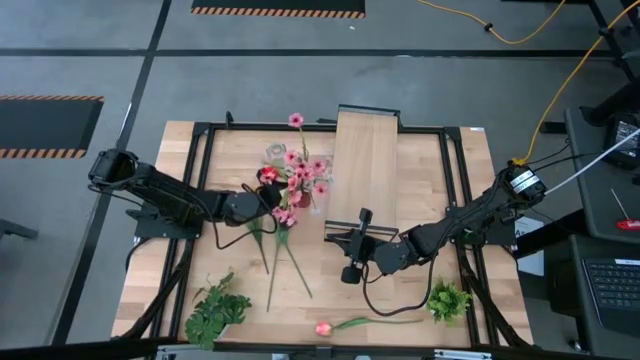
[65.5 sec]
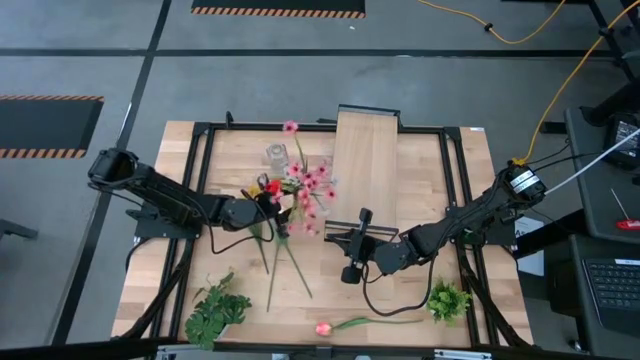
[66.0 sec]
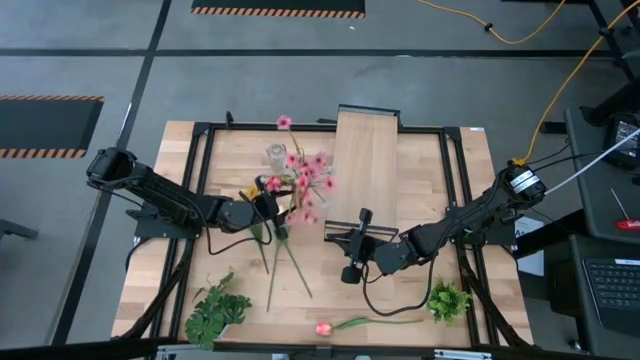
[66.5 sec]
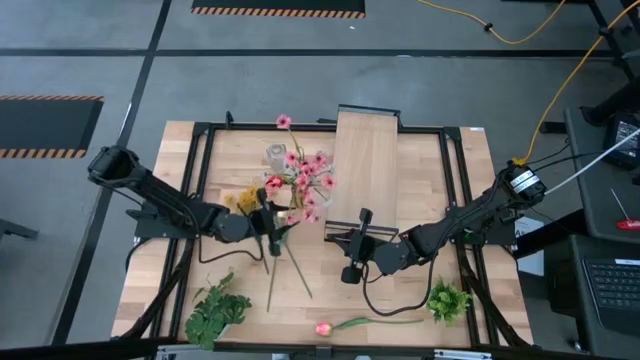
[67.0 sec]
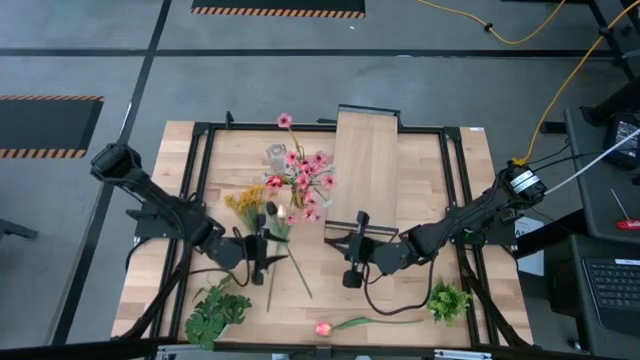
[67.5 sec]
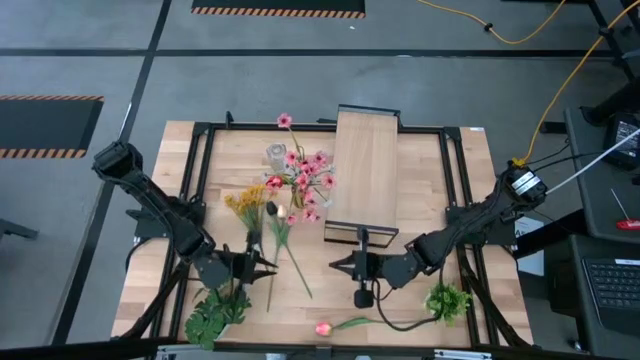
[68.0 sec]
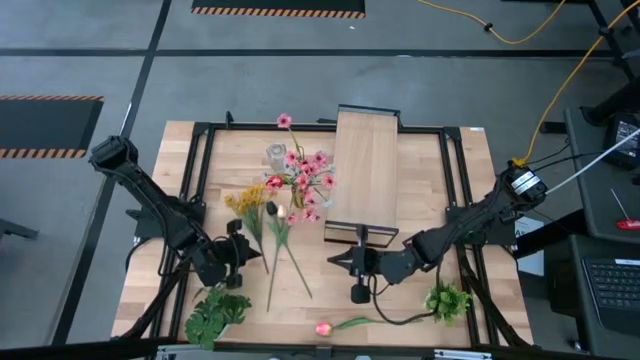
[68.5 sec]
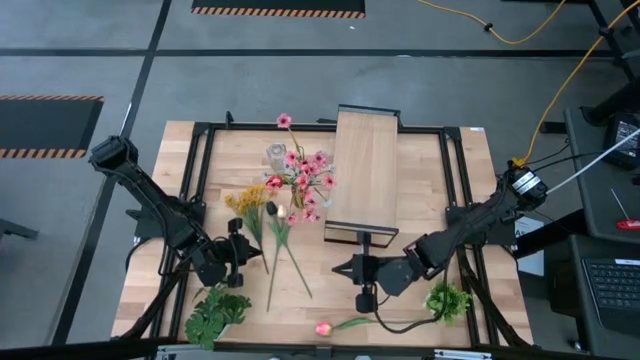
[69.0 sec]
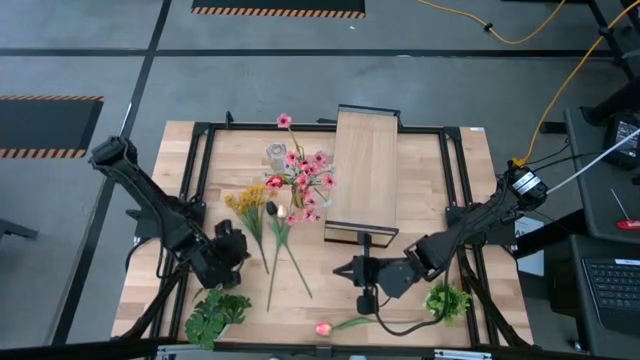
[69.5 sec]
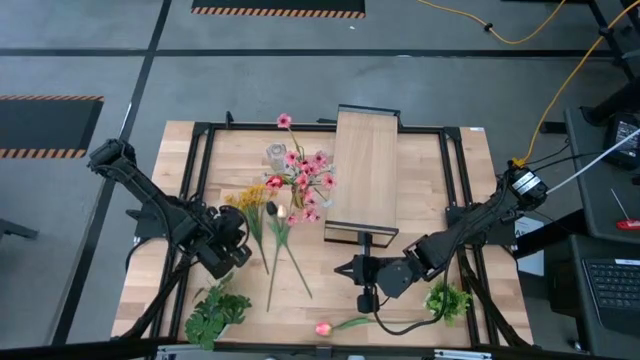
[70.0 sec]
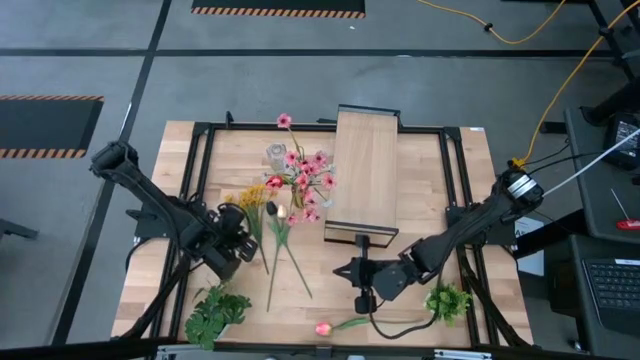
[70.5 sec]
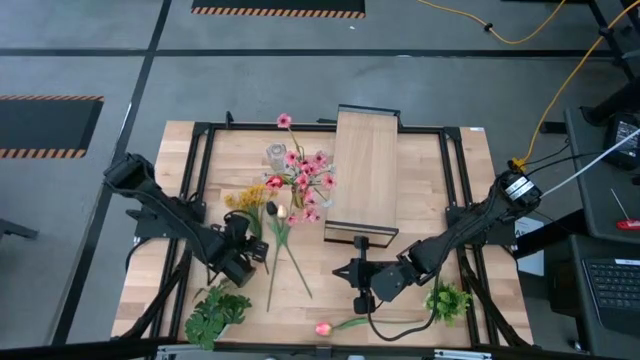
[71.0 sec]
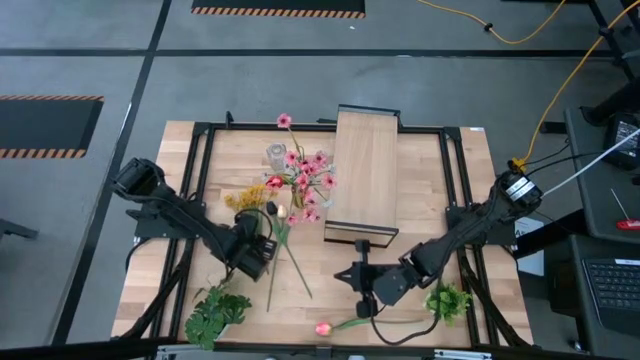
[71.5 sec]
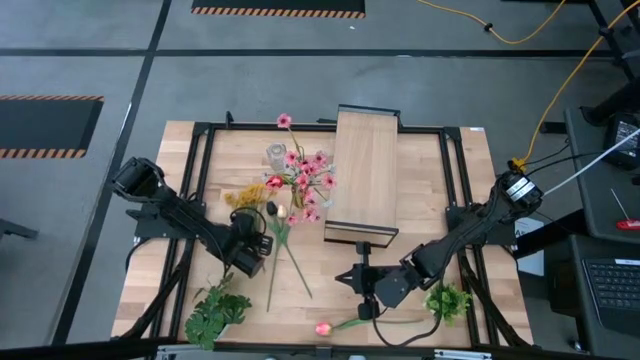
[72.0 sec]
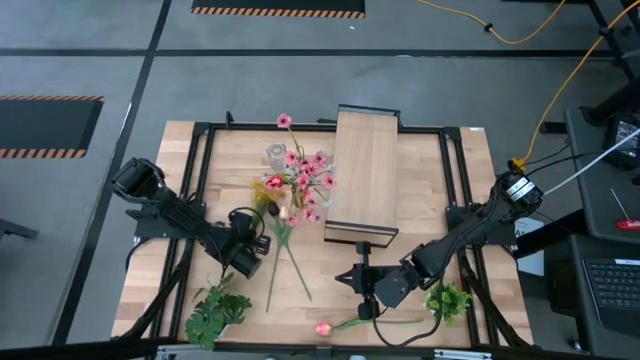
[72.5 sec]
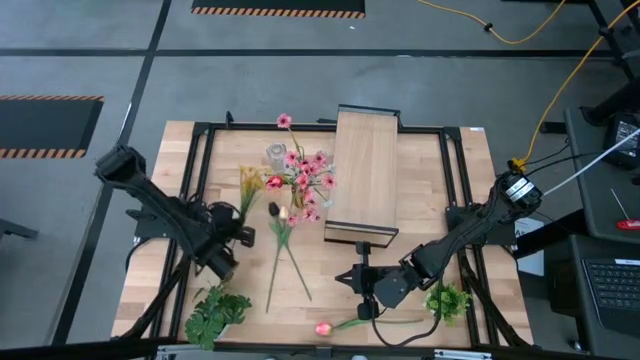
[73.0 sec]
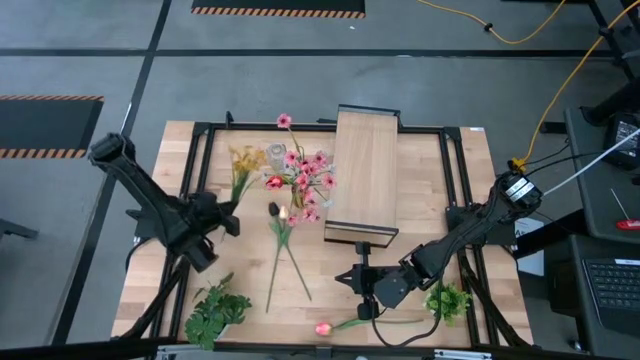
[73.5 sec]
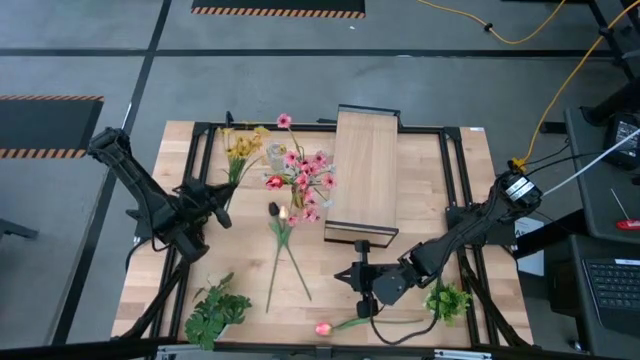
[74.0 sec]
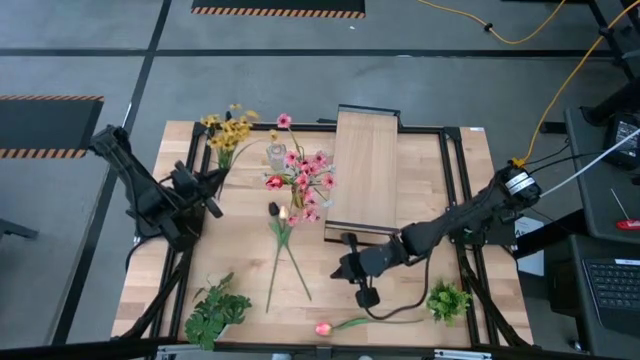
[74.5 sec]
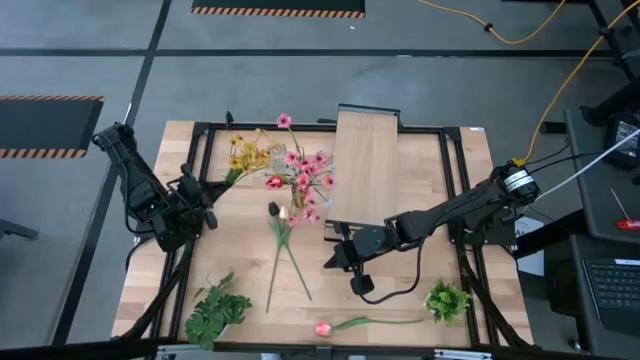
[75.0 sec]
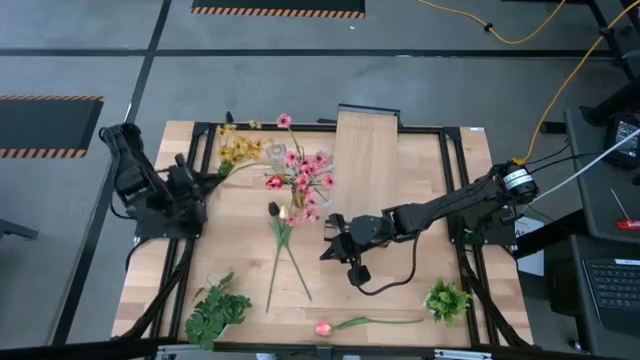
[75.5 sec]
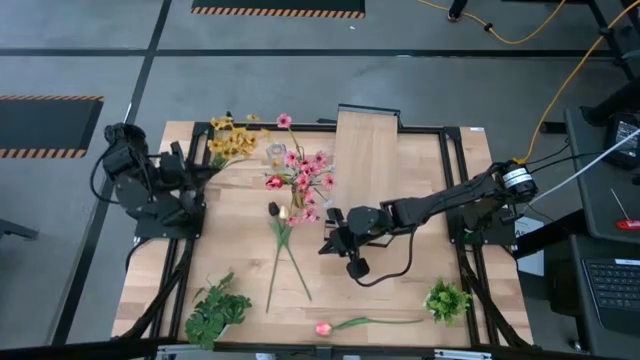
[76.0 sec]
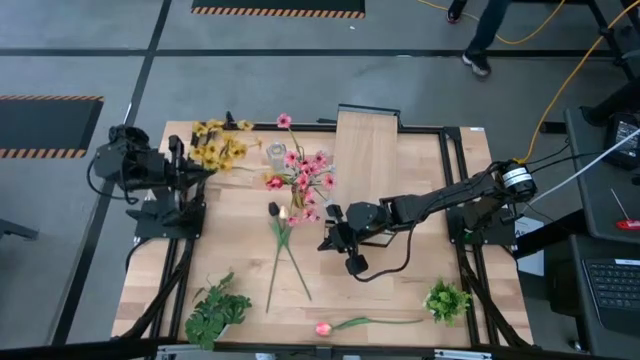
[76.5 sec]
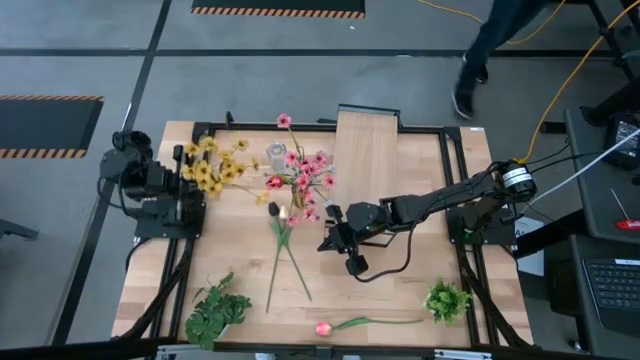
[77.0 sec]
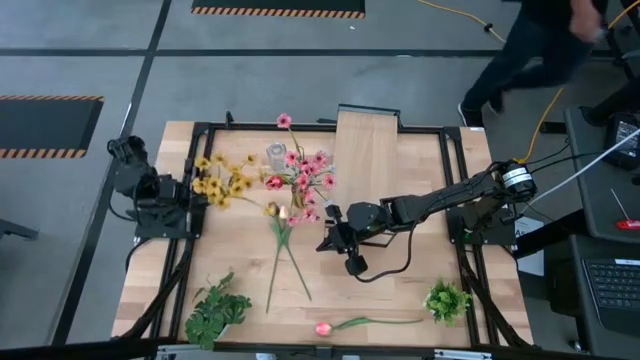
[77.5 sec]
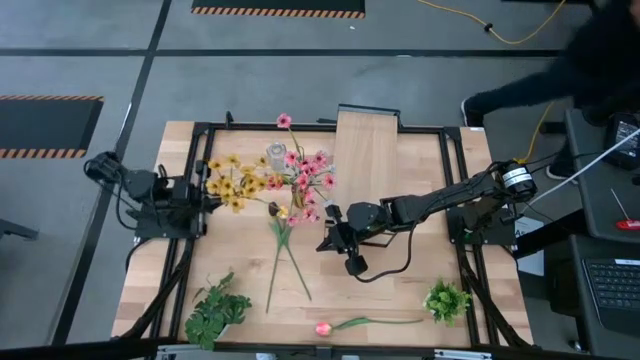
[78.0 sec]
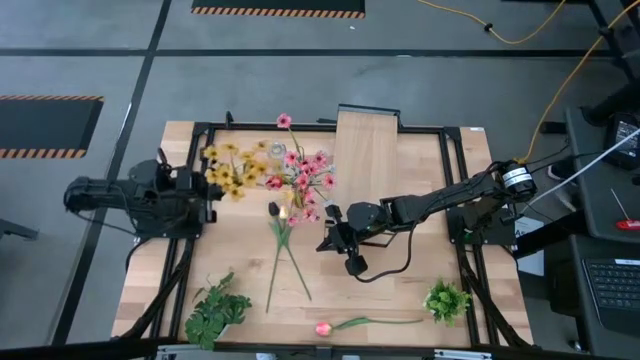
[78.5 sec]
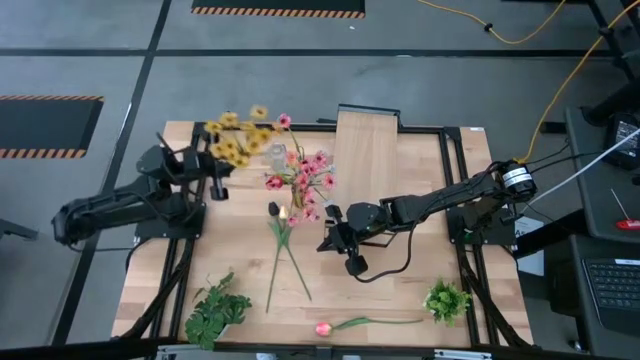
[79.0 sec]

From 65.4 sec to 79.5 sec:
Task: Pick and place flowers into a vace then onto a shelf
Put the yellow flowers into the transparent vase
